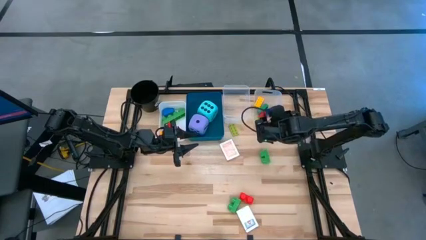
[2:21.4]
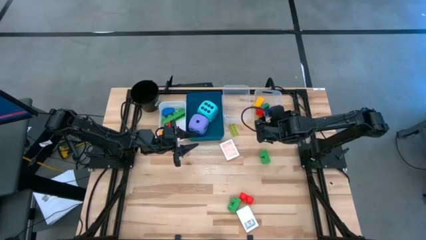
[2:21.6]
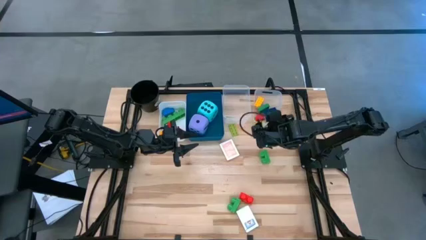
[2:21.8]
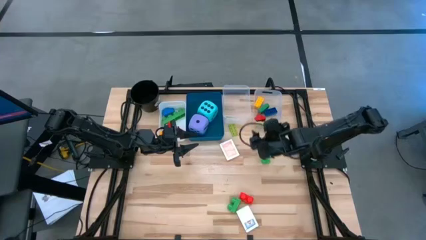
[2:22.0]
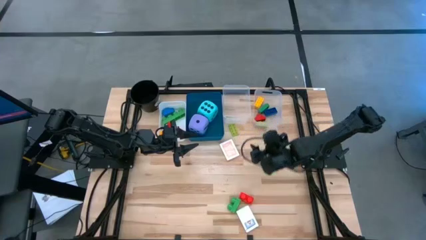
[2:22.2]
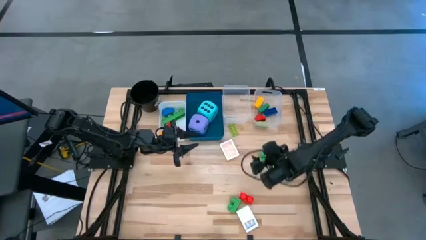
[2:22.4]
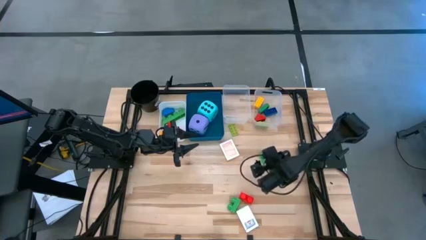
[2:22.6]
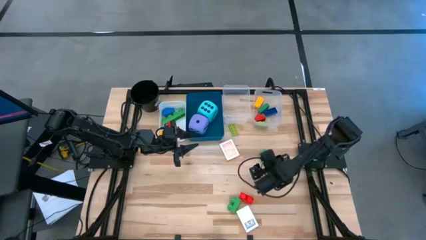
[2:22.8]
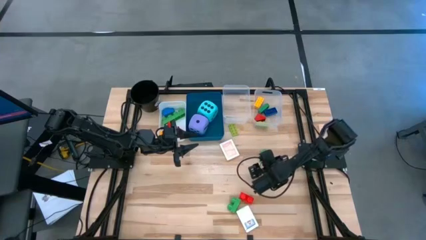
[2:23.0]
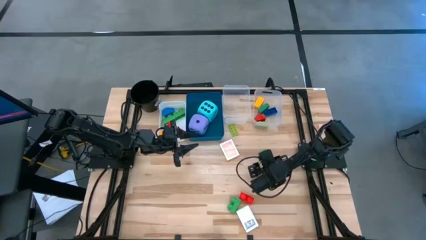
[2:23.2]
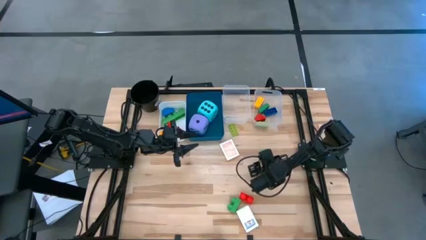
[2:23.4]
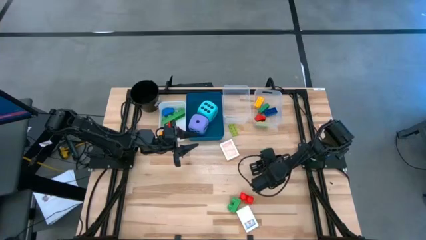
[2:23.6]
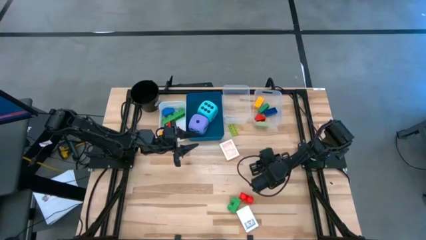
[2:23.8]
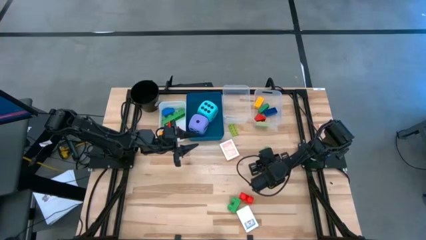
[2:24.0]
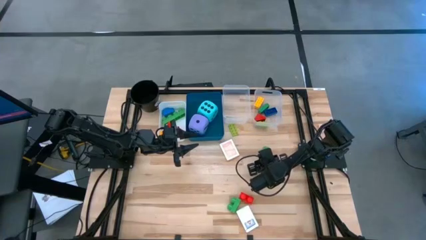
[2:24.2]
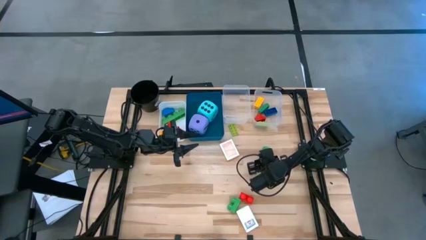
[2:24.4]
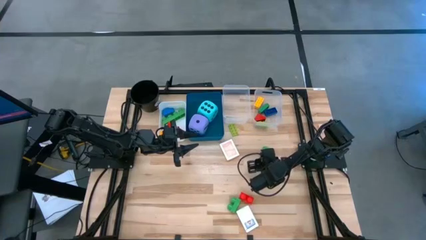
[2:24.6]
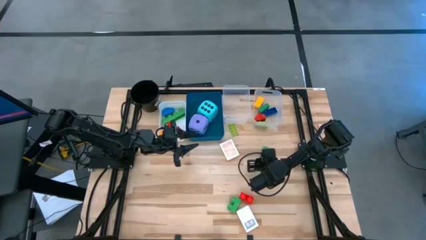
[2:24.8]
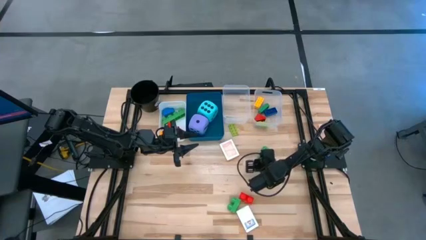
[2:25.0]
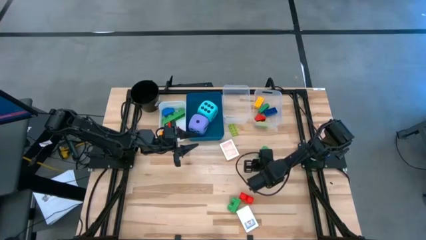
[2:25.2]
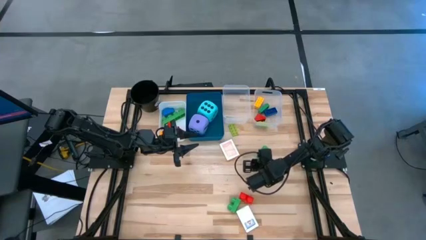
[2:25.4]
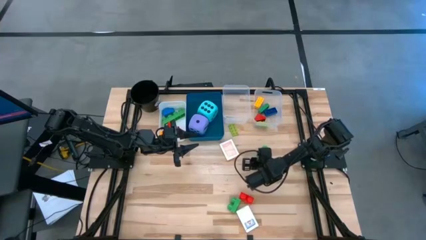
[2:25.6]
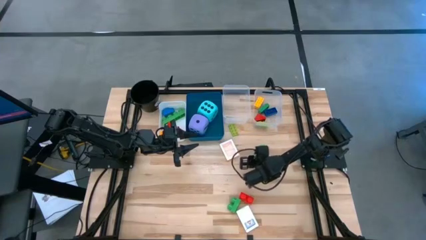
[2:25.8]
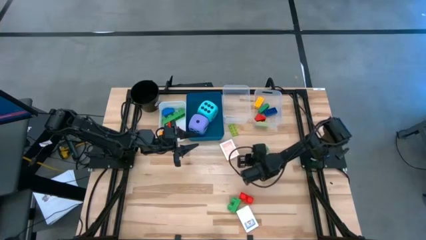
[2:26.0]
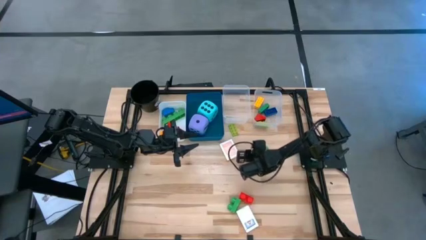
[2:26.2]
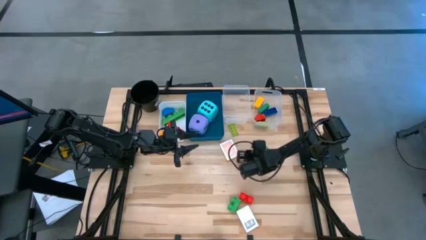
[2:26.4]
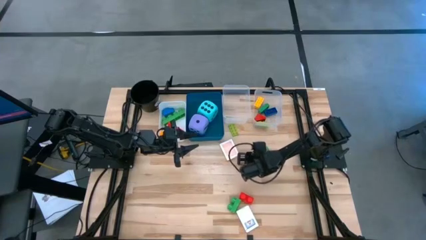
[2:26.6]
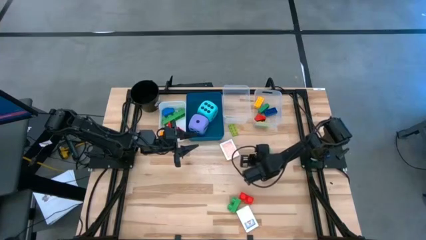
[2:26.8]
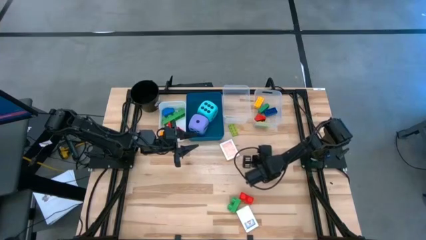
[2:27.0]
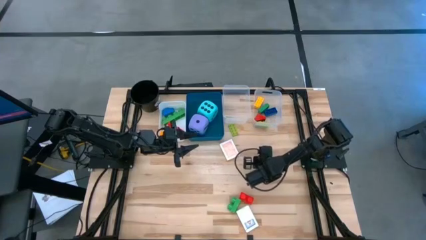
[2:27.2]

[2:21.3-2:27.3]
Task: Pick & Place Toys
Put the top large green game piece into the white bin

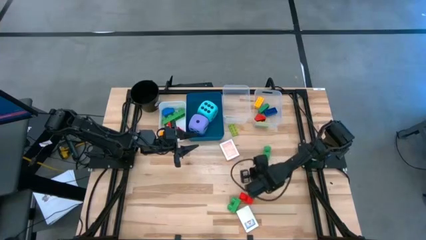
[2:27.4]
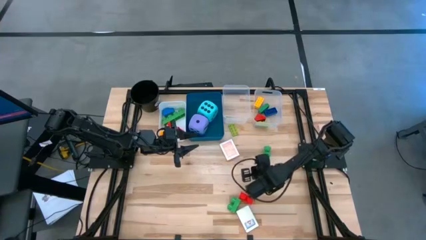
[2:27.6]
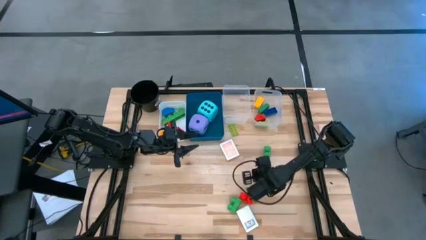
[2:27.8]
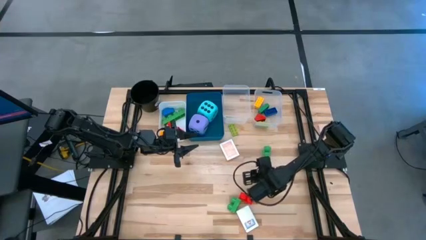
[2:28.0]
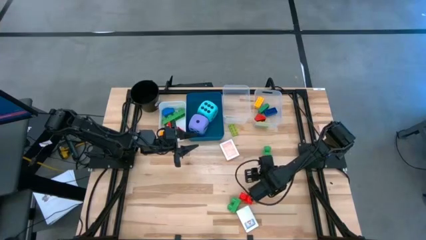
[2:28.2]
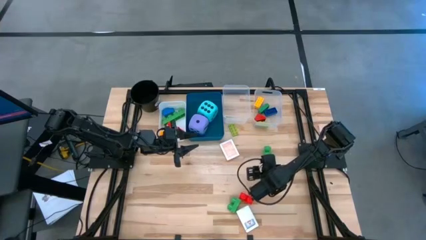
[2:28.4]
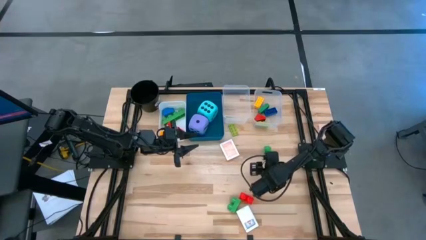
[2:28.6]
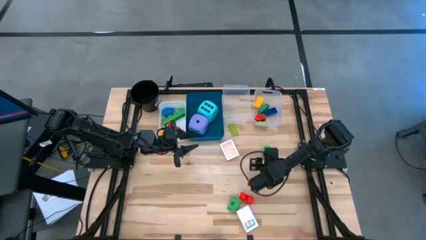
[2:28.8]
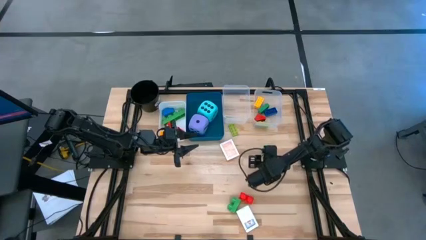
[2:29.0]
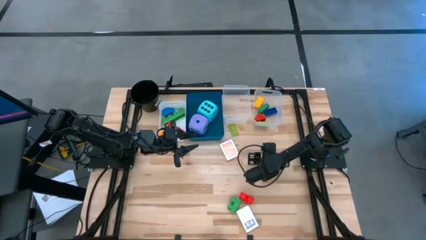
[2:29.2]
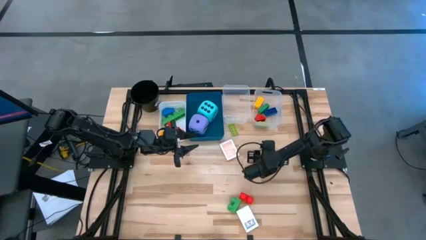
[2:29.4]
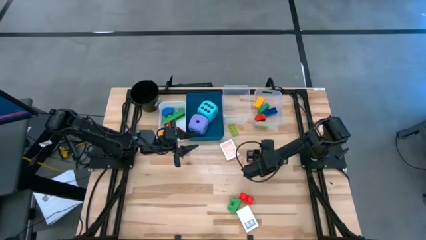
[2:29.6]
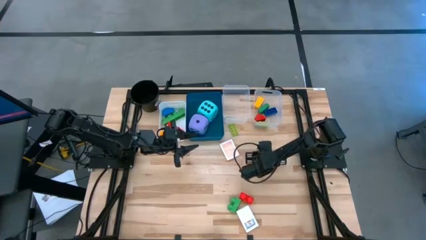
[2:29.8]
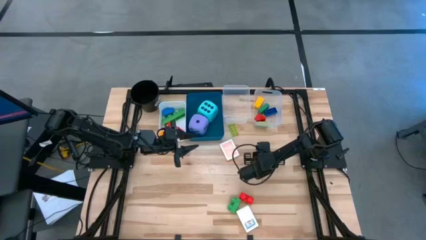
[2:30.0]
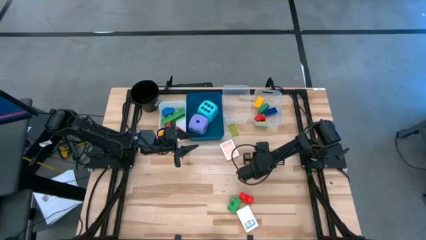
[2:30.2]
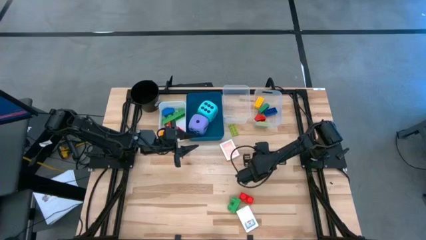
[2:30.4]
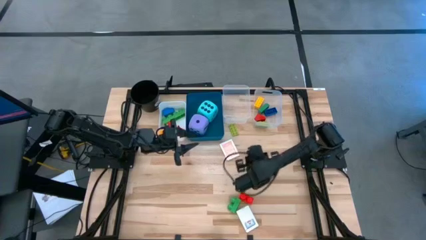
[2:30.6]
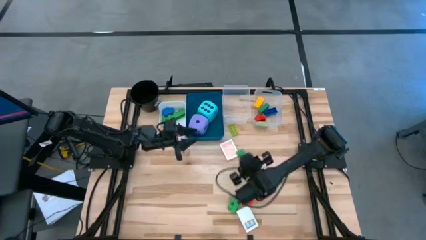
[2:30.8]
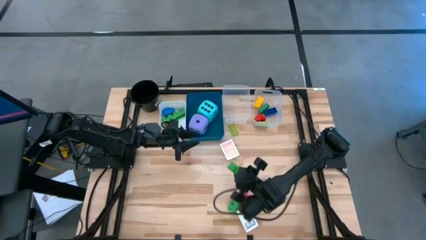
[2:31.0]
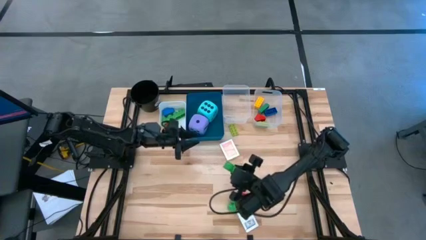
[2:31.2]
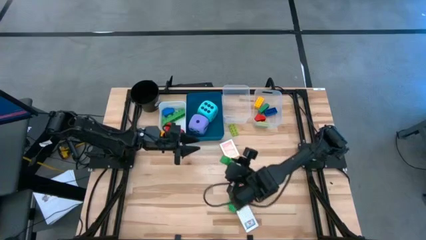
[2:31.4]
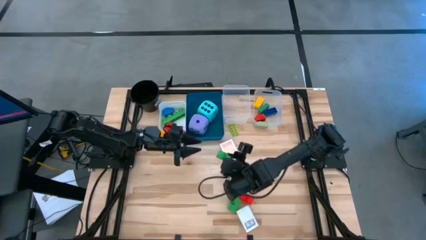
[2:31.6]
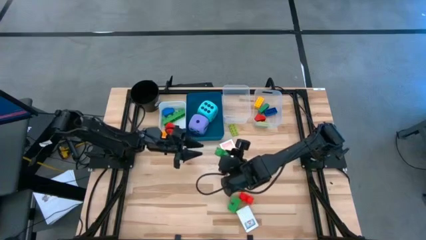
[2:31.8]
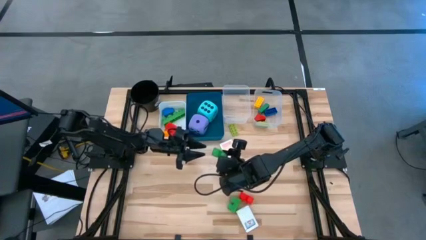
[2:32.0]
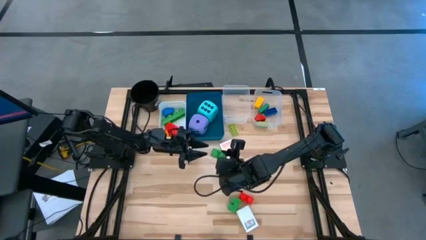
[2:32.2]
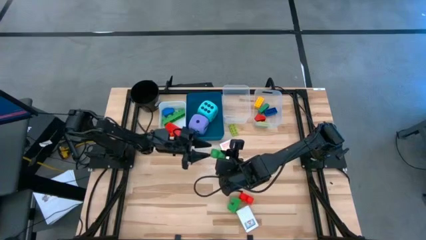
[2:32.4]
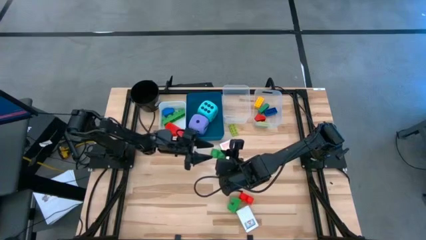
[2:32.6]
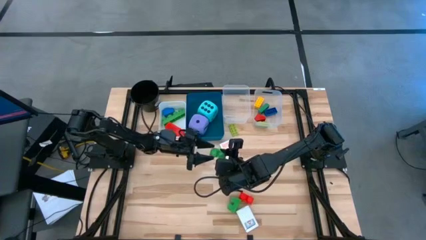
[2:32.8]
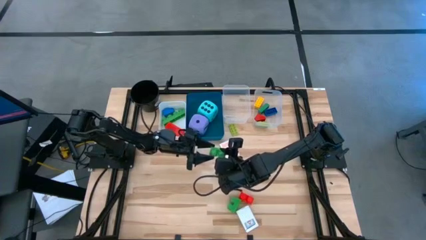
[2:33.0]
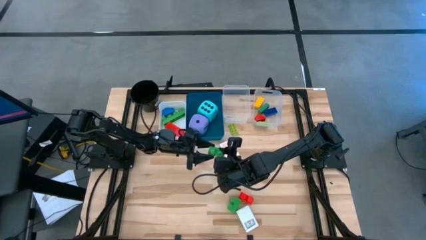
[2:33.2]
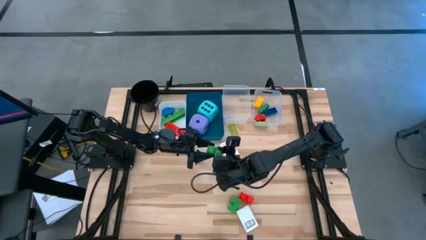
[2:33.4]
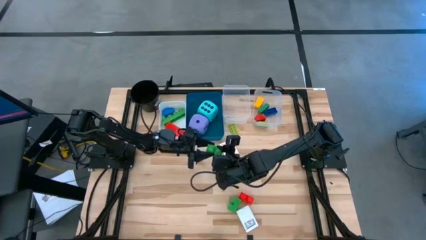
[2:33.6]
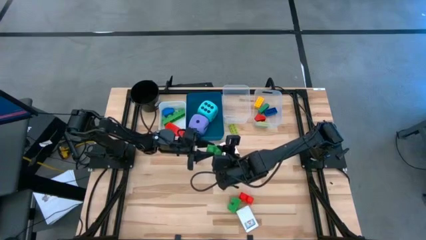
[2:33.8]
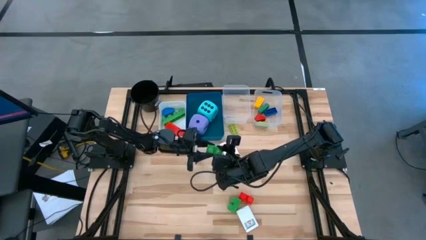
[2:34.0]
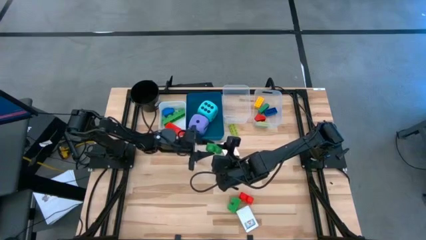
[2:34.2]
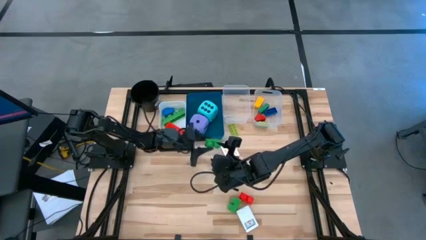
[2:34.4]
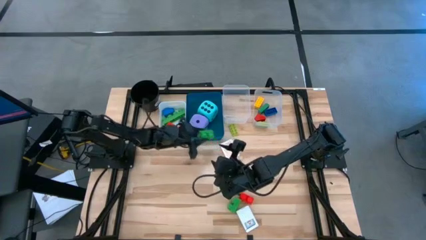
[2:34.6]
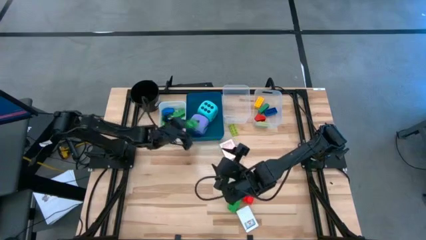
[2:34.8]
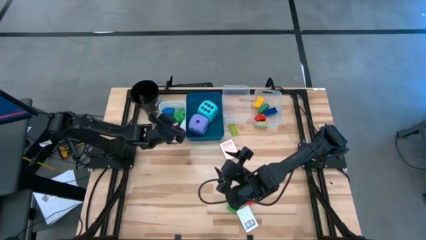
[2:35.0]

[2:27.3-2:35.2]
Put the top large green game piece into the white bin

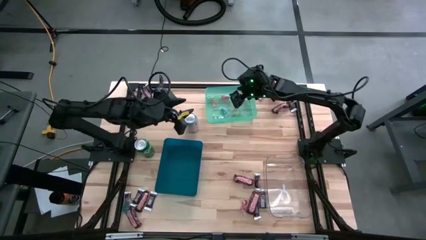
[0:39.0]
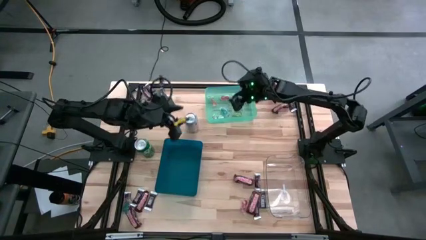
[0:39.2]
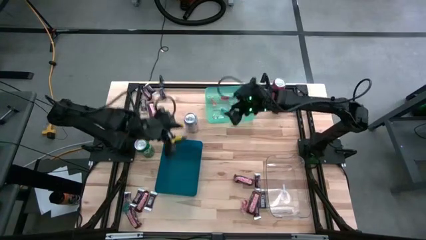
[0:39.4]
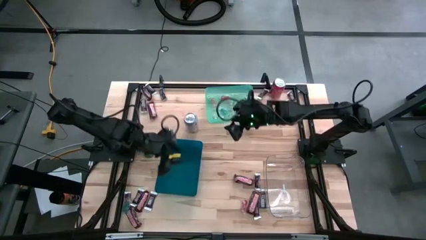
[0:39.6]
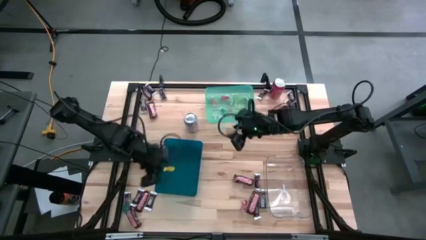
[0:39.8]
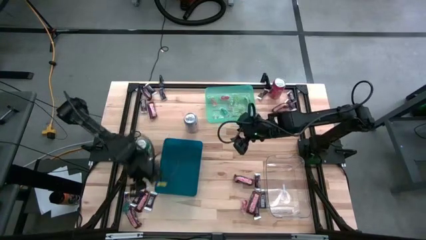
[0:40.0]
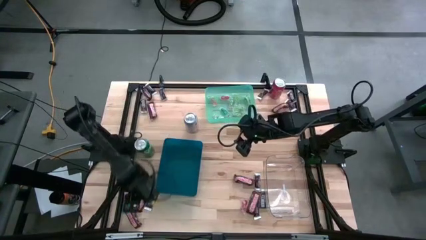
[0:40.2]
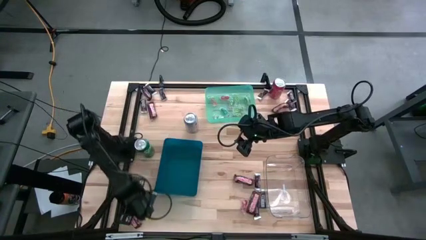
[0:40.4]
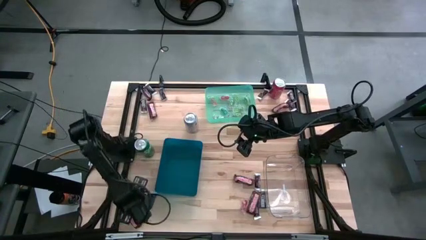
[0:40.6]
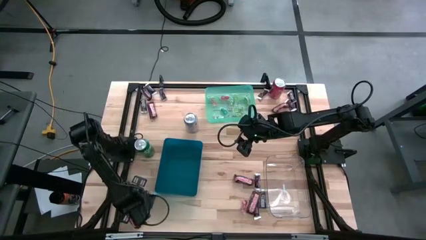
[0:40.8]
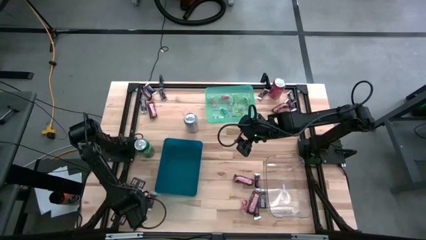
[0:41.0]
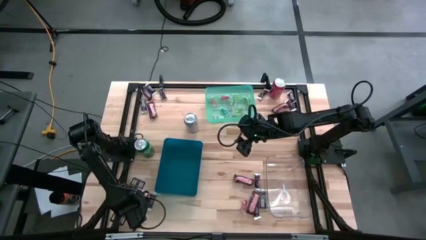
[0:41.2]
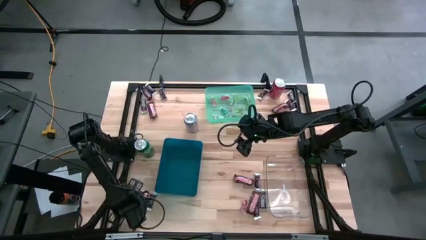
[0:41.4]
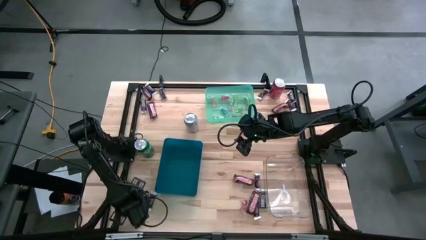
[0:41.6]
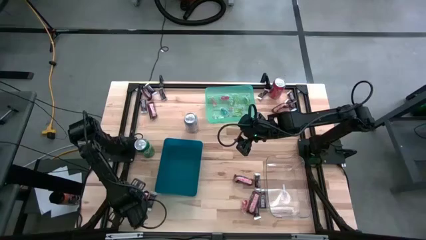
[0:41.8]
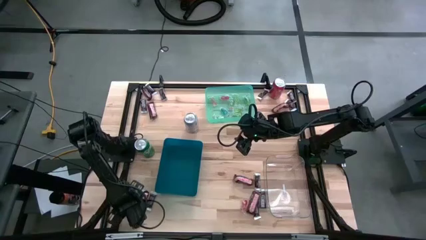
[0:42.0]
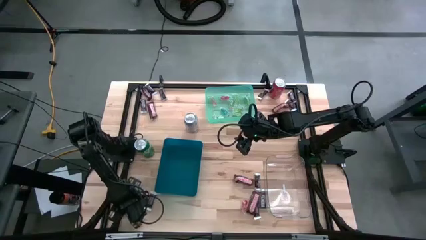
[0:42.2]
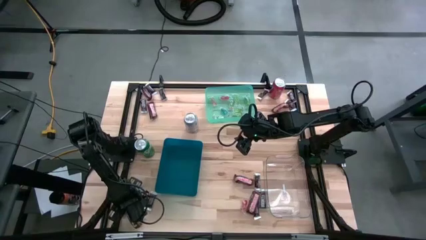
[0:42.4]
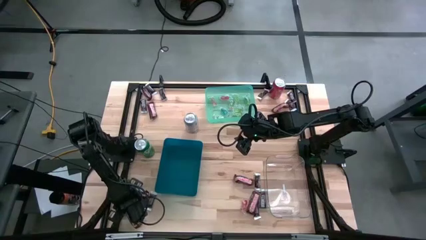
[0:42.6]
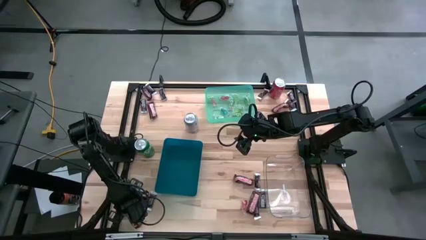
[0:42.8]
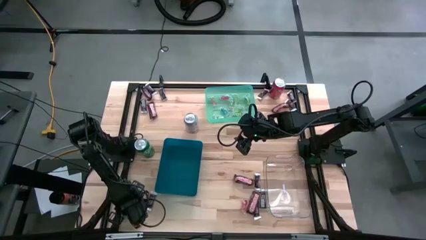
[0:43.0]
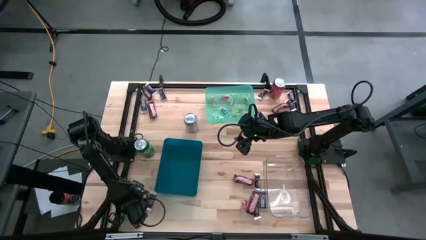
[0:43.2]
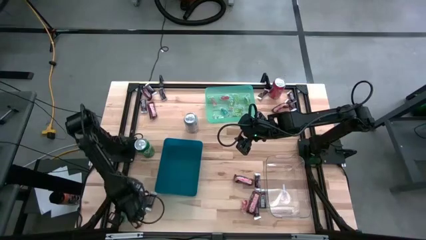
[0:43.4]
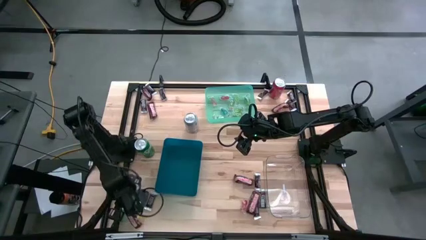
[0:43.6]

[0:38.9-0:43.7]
Task: Organize candy in baskets
Put the transparent gummy into the green bin
